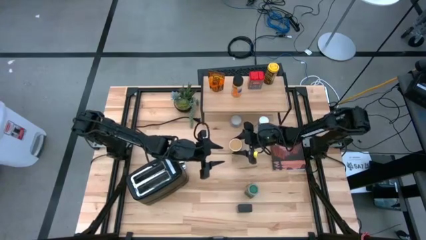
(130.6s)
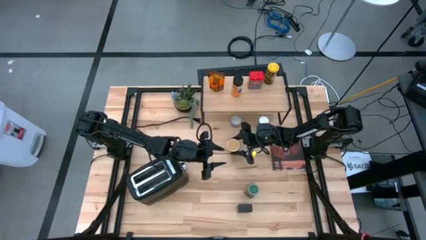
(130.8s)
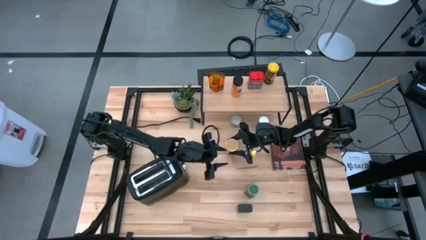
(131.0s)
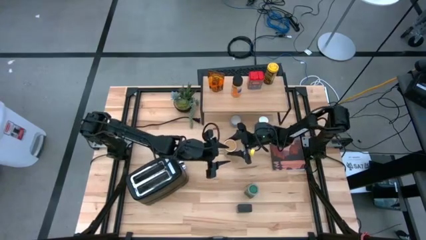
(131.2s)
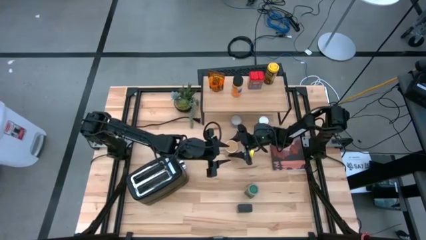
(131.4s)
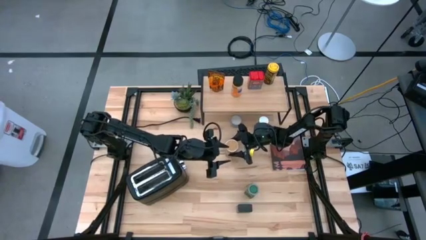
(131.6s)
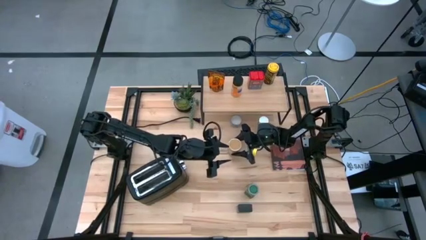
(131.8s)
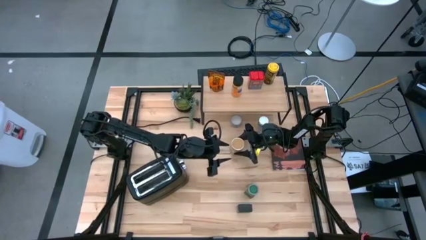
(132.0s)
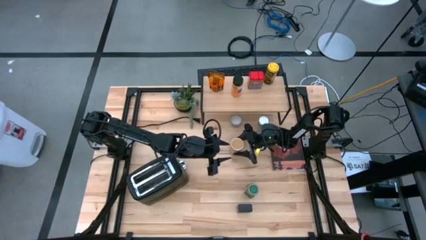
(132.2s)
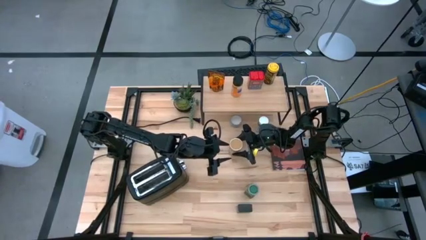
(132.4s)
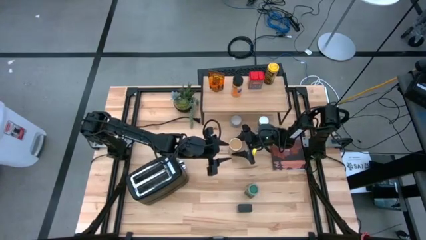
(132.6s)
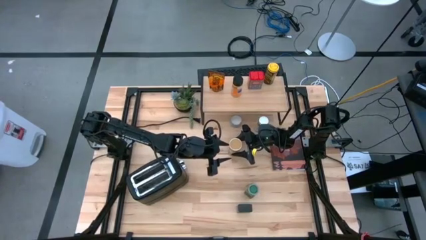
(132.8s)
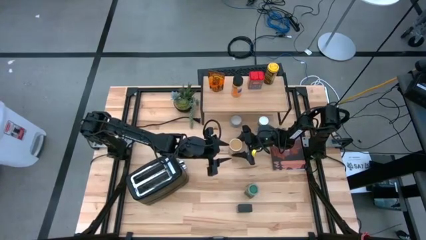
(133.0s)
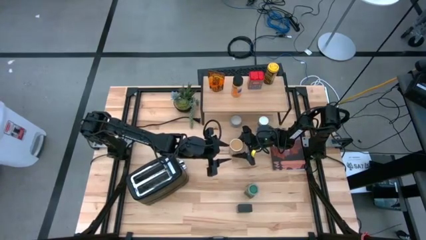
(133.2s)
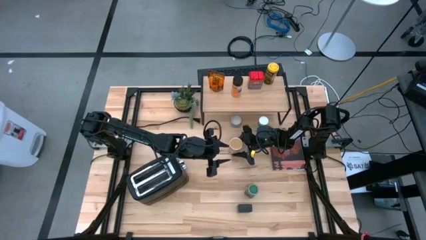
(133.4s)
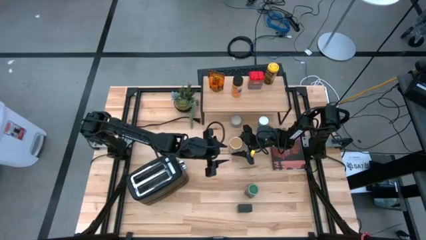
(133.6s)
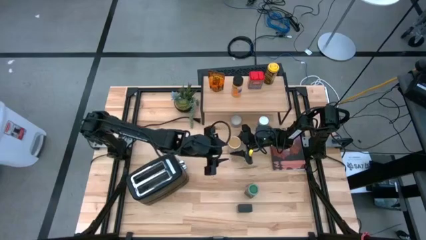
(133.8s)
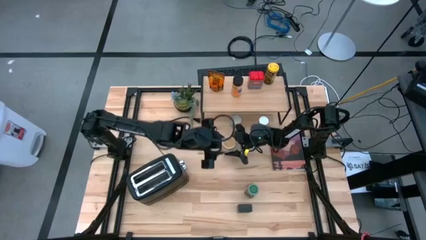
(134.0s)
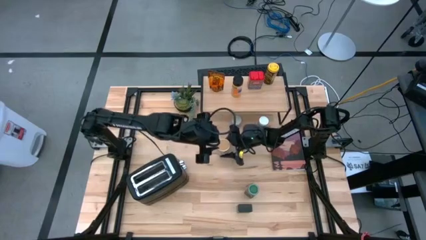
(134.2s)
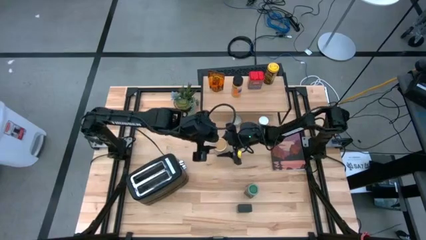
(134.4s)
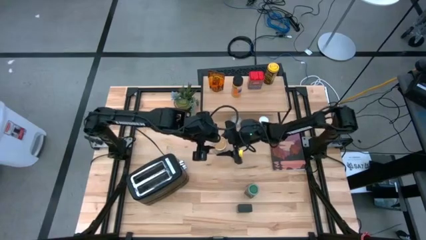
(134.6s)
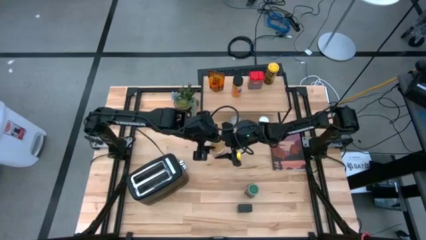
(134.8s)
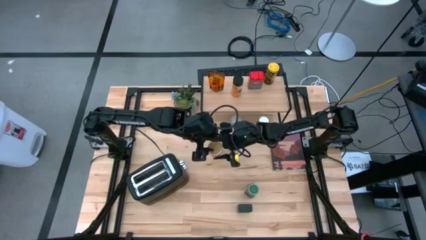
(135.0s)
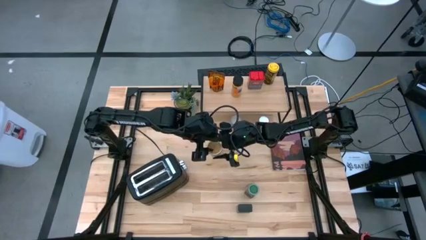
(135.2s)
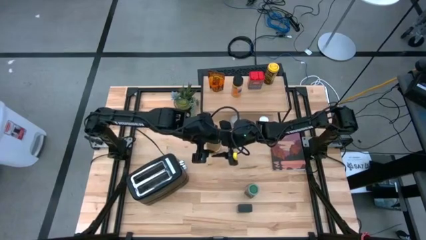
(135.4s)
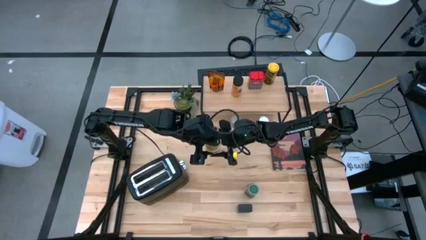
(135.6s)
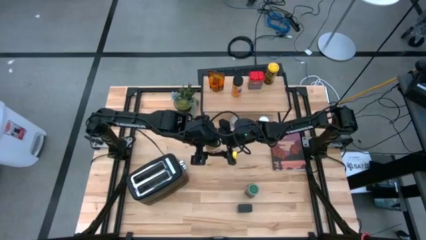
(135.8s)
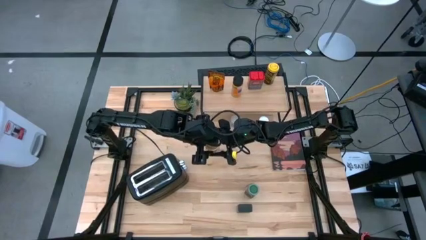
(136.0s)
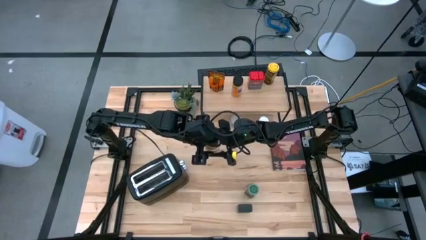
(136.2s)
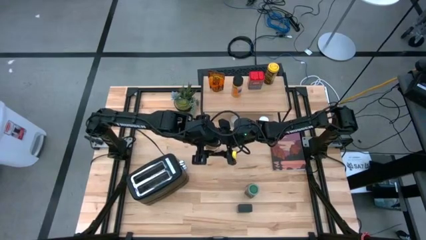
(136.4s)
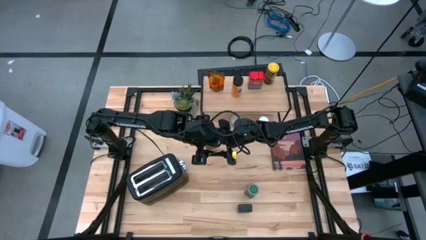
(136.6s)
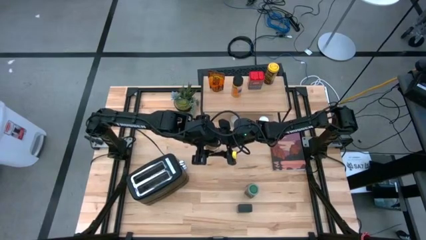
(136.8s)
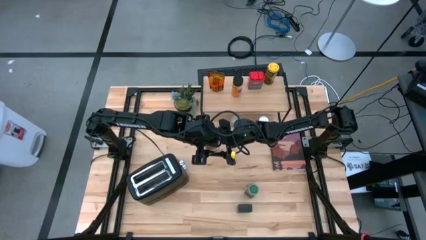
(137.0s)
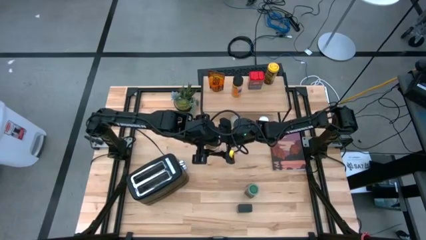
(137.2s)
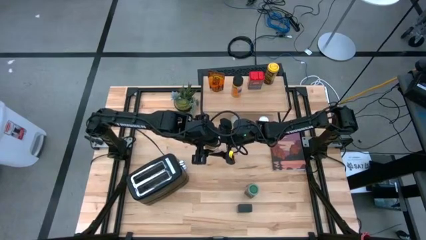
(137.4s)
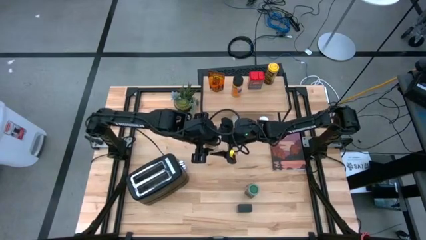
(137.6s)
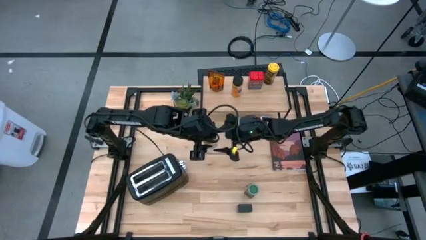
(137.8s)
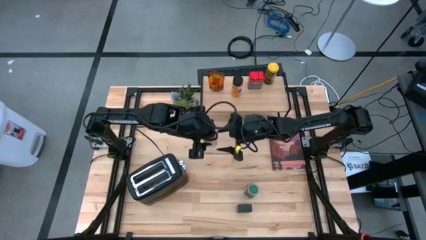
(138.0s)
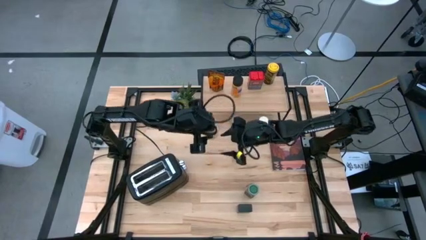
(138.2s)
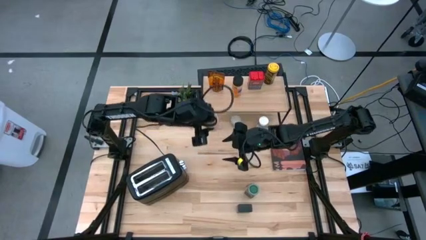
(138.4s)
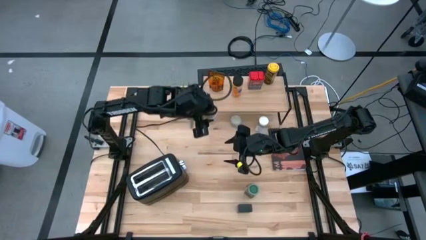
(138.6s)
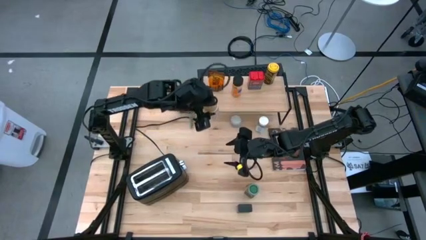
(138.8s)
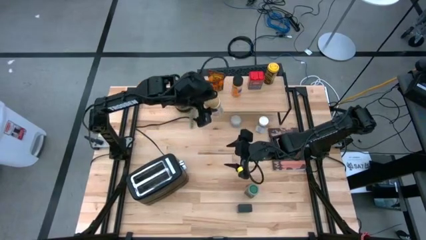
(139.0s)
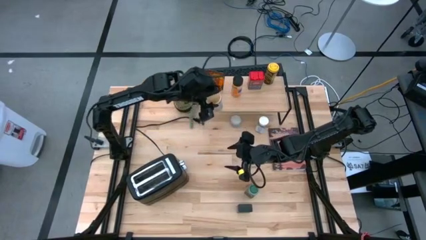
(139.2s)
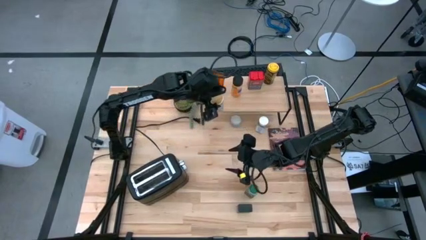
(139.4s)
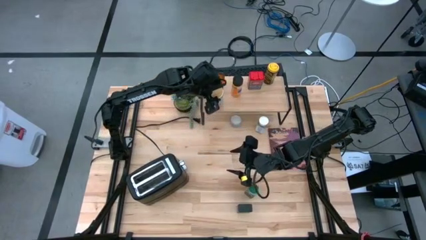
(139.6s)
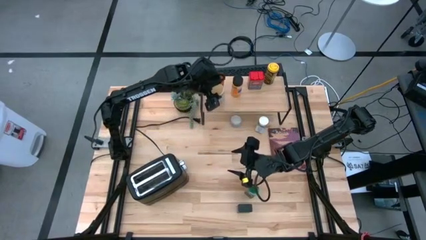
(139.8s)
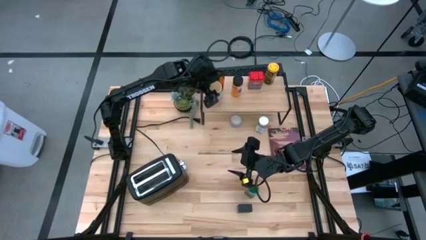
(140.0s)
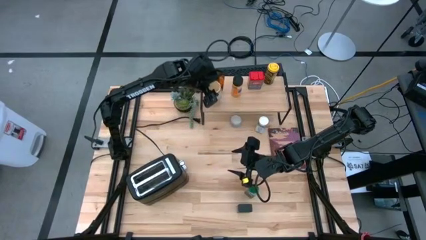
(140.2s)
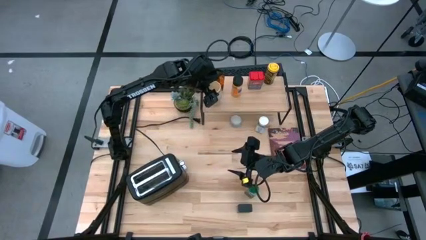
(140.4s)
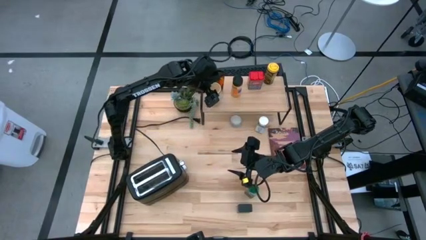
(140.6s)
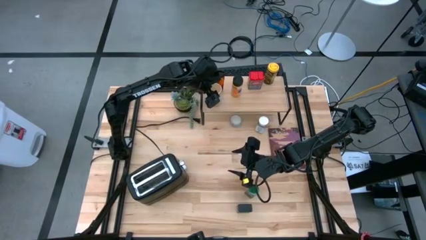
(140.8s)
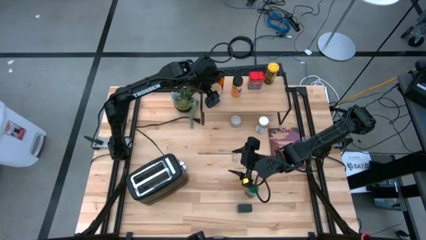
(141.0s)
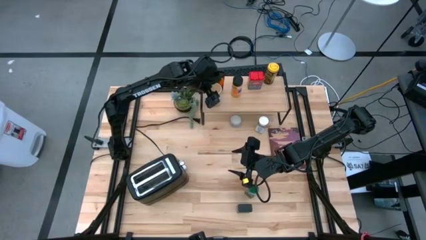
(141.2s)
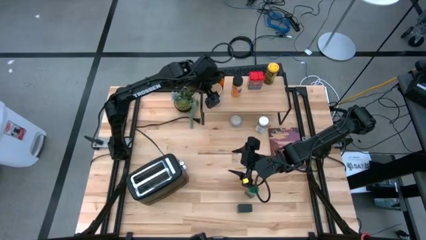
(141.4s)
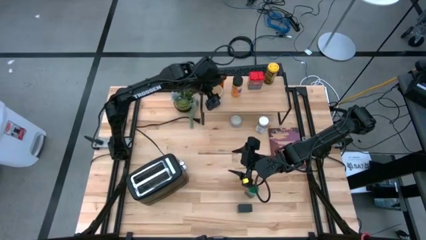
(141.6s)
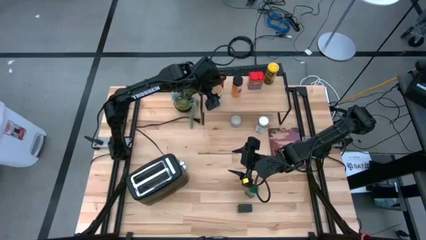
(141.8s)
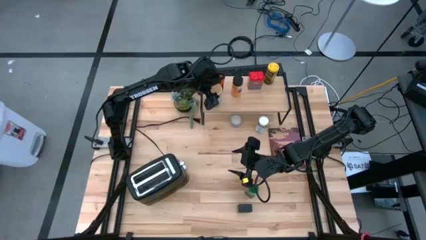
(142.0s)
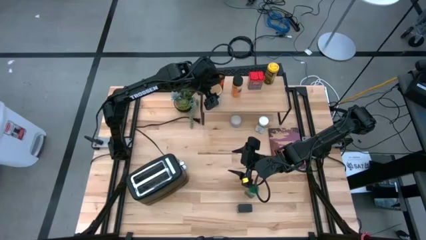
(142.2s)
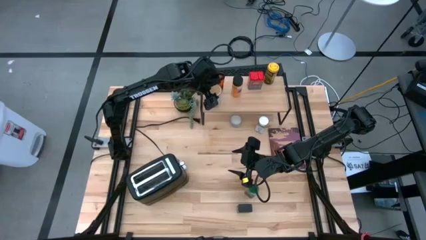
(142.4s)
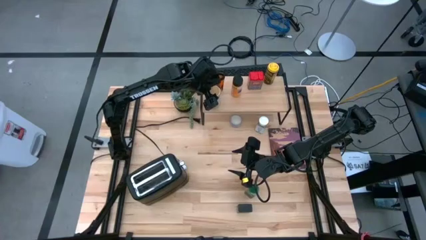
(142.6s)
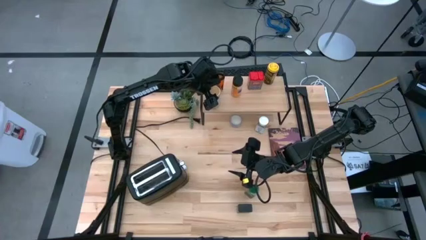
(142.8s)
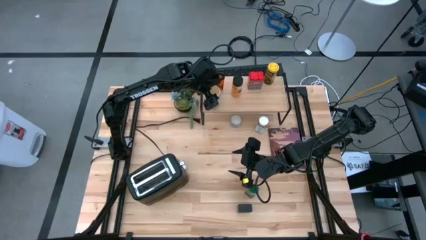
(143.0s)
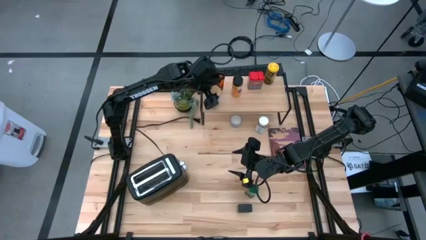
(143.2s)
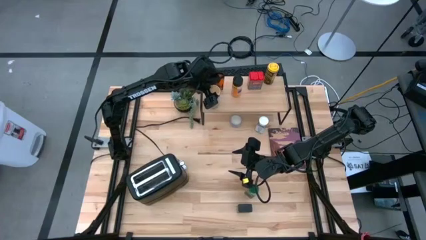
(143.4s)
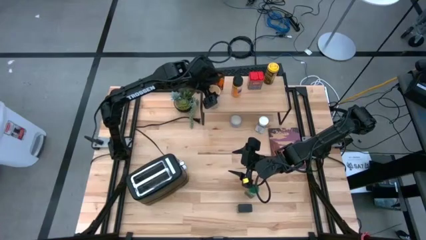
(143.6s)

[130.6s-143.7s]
Task: Shelf spices
Put the brown seasoning bottle on the shelf

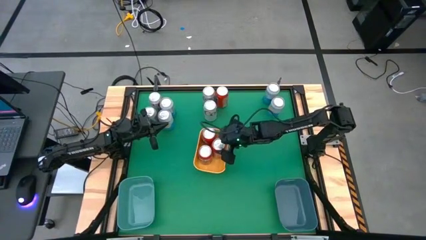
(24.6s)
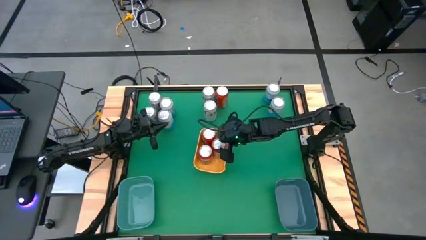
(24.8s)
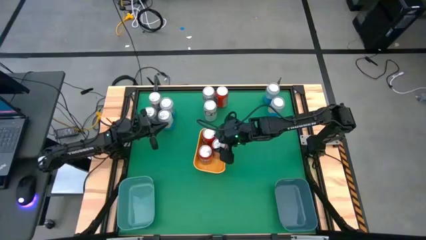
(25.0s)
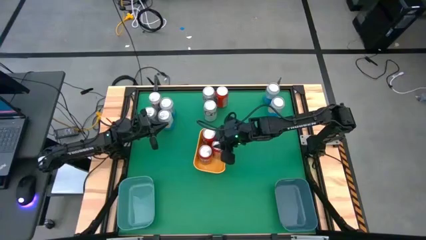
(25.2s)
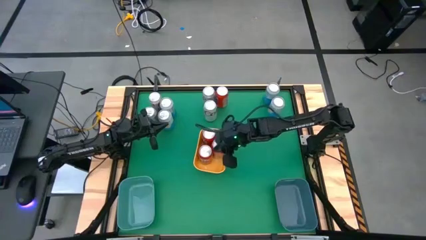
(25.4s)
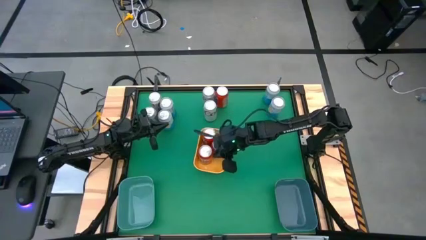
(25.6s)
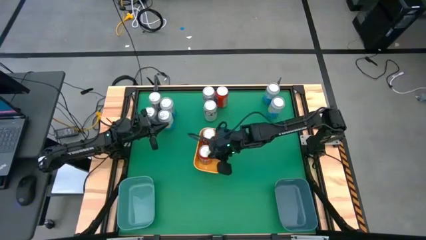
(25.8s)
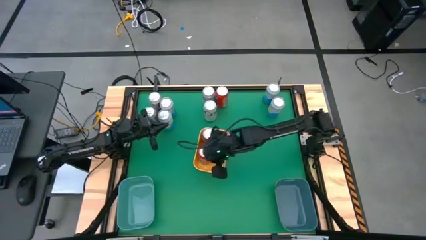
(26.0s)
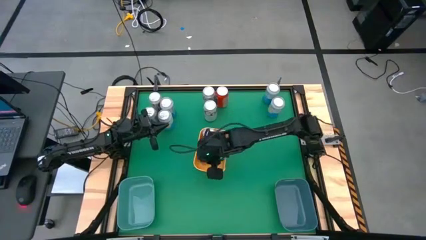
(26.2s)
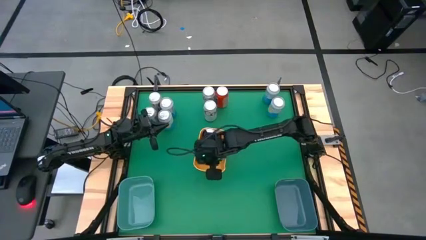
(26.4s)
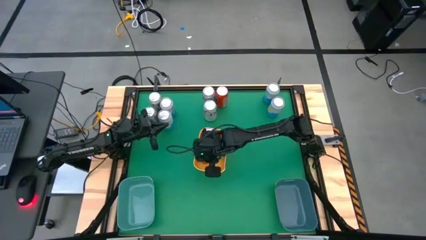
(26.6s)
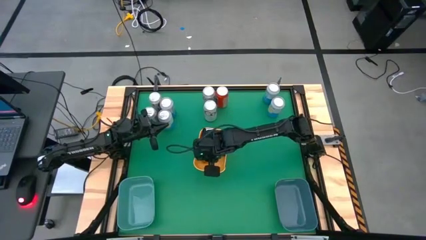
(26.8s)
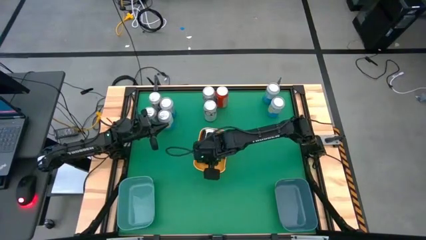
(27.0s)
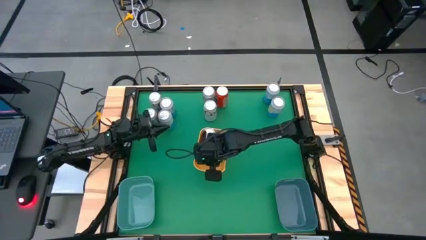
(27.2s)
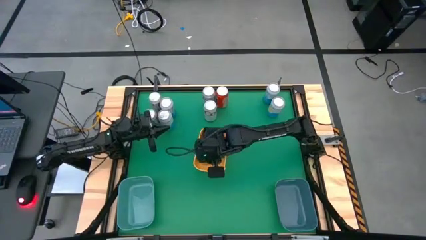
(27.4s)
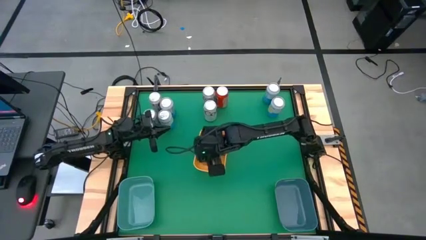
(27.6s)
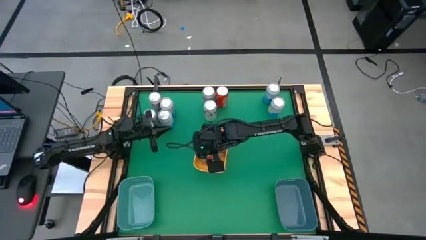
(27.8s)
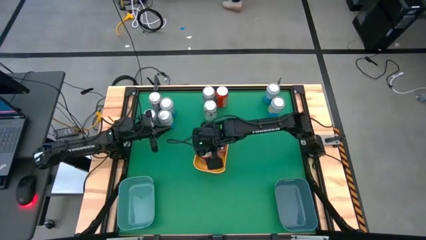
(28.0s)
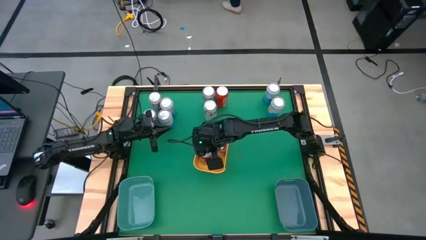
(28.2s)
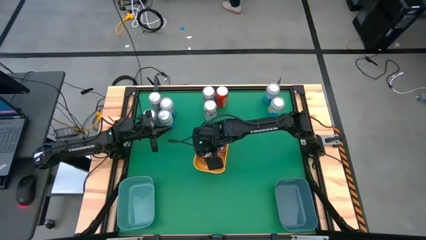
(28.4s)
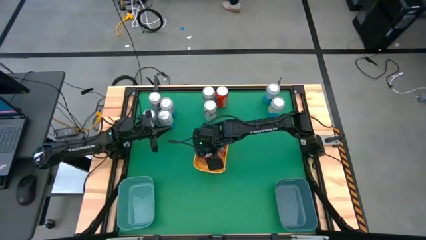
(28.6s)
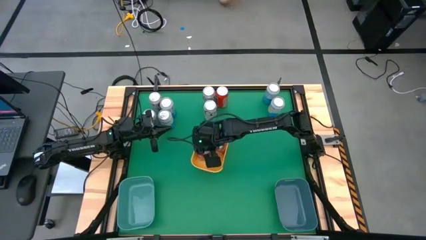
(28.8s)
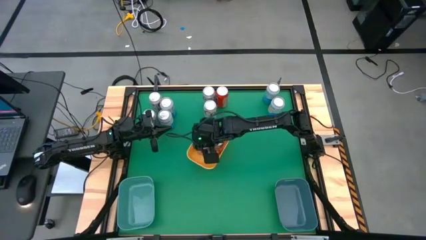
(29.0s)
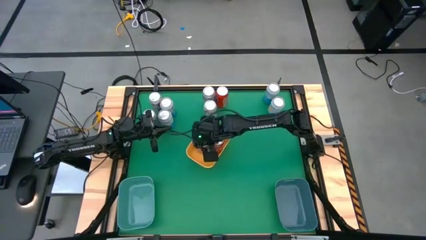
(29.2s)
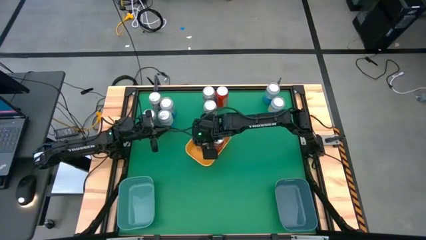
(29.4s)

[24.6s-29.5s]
Task: Sort soda cans
Adjust the bottom orange soda can in the yellow bin
